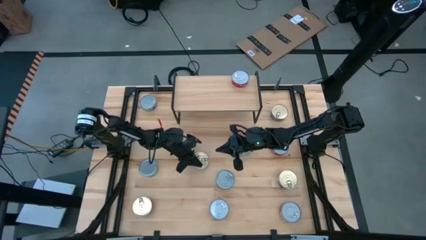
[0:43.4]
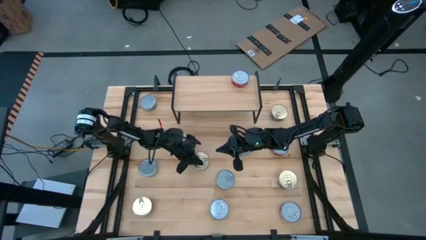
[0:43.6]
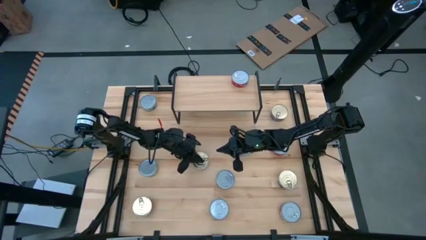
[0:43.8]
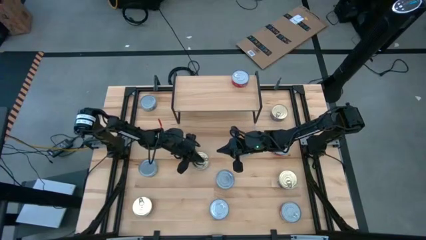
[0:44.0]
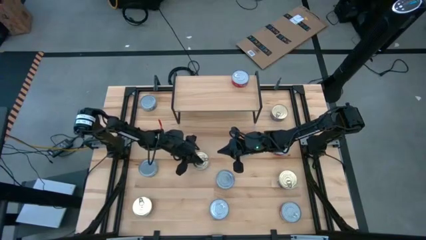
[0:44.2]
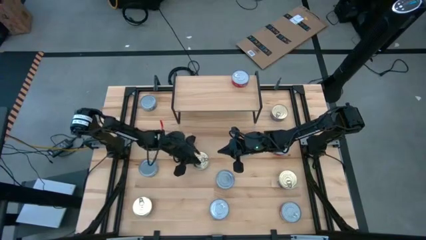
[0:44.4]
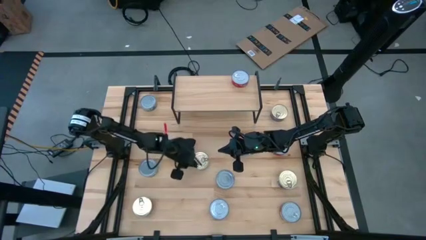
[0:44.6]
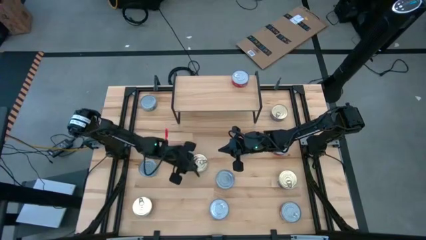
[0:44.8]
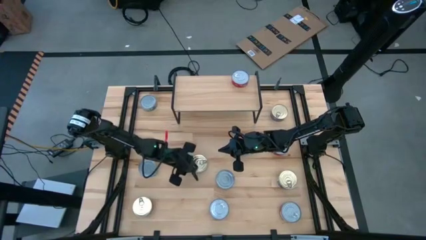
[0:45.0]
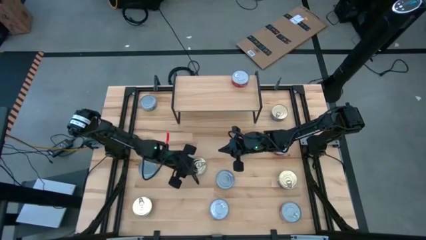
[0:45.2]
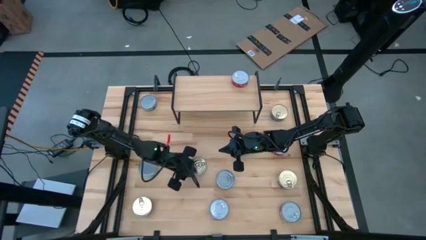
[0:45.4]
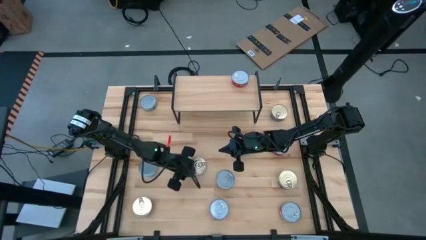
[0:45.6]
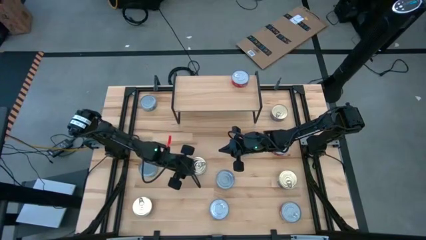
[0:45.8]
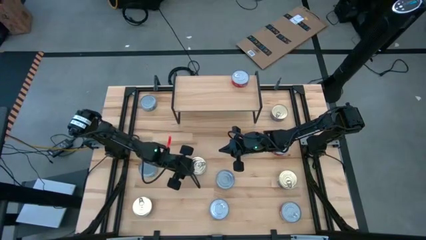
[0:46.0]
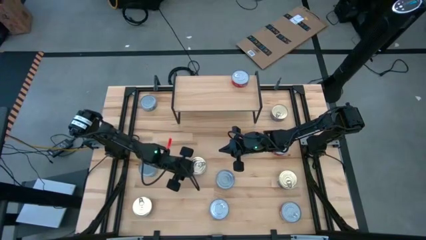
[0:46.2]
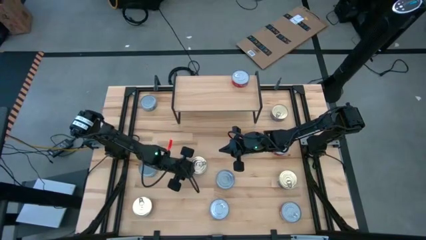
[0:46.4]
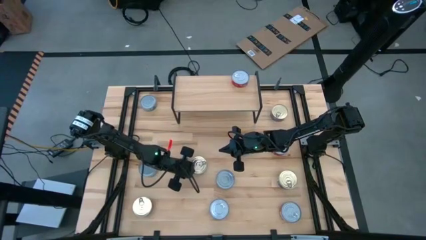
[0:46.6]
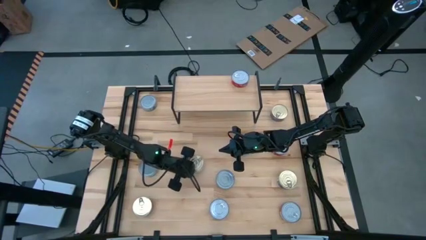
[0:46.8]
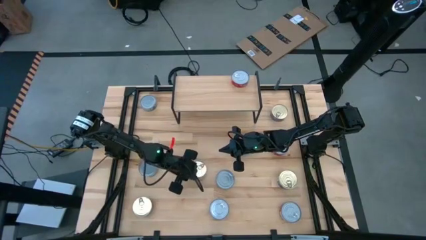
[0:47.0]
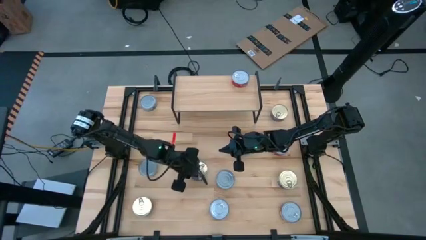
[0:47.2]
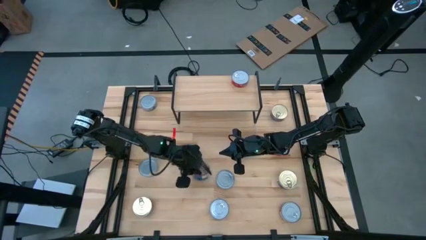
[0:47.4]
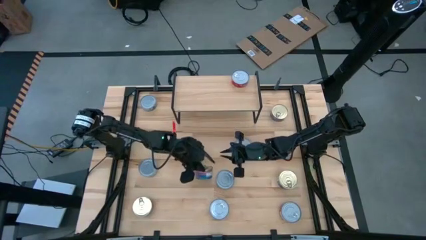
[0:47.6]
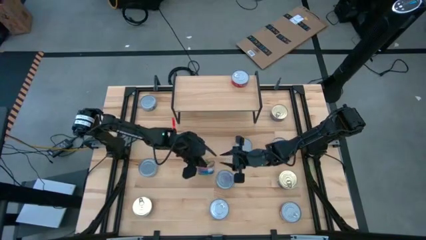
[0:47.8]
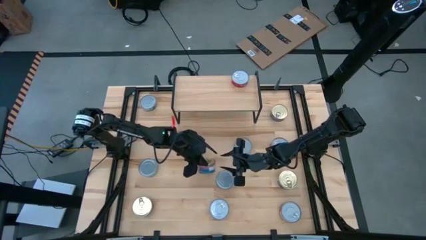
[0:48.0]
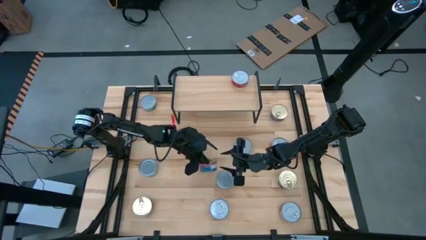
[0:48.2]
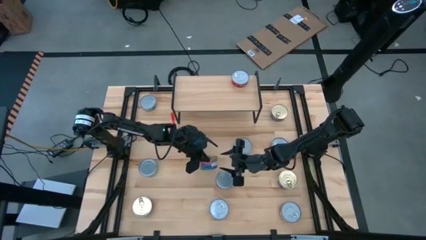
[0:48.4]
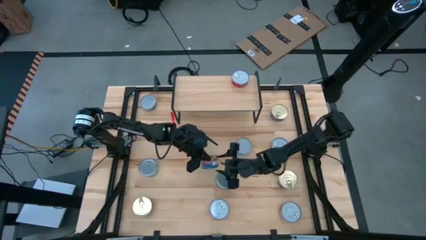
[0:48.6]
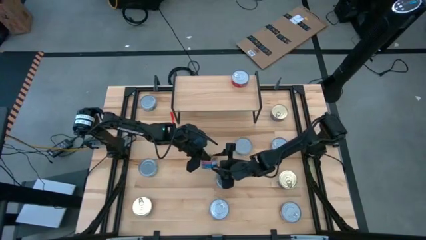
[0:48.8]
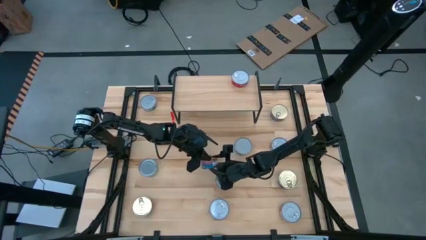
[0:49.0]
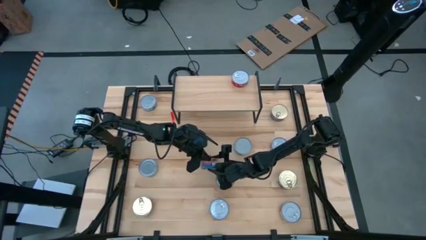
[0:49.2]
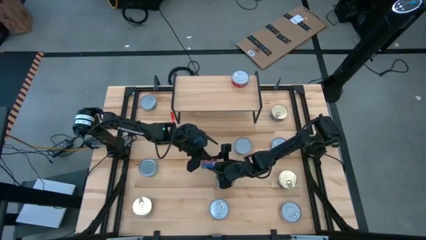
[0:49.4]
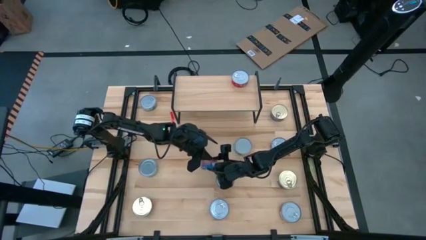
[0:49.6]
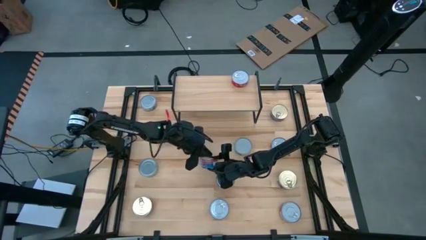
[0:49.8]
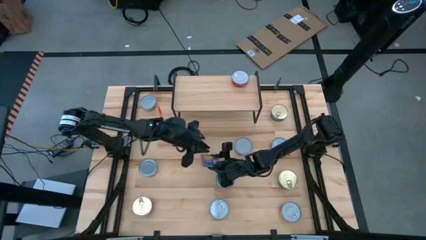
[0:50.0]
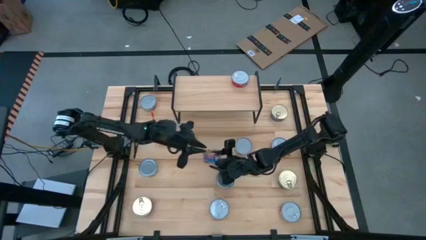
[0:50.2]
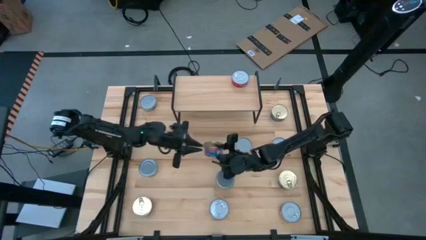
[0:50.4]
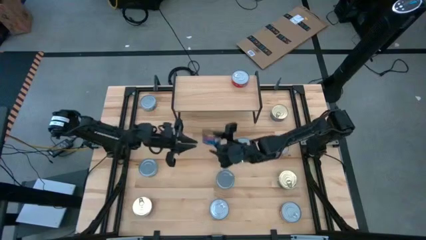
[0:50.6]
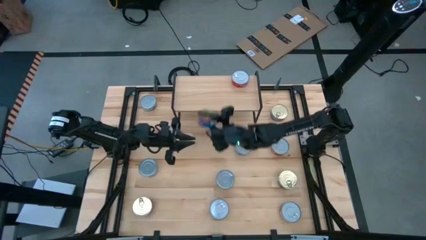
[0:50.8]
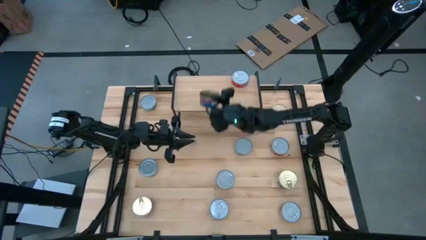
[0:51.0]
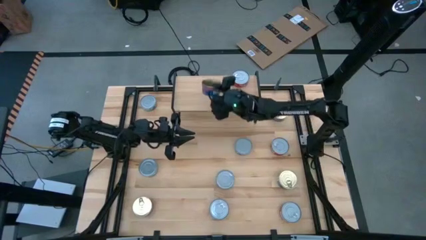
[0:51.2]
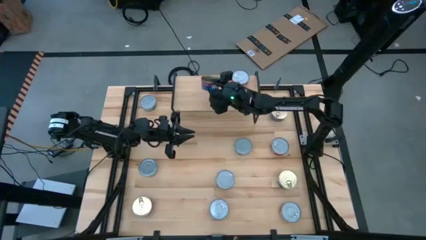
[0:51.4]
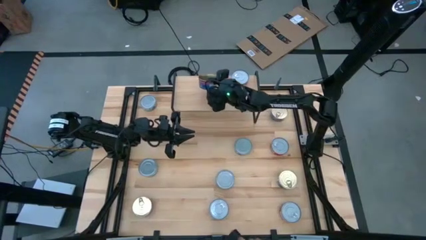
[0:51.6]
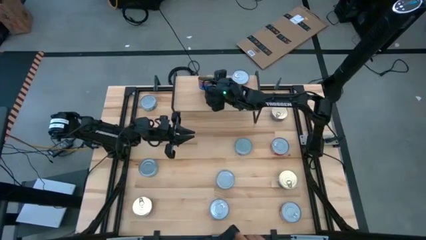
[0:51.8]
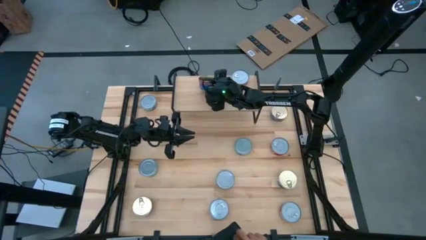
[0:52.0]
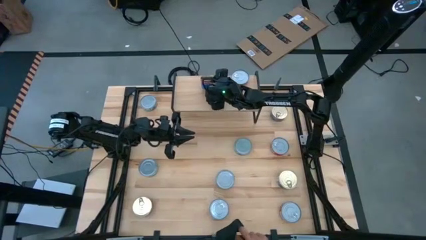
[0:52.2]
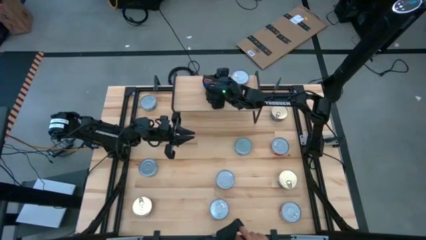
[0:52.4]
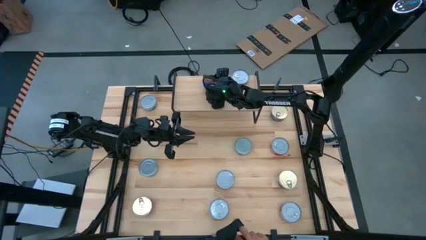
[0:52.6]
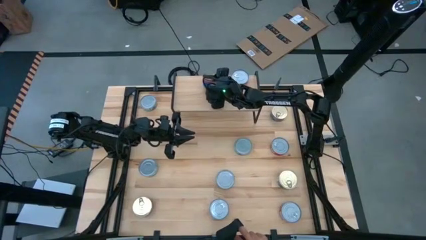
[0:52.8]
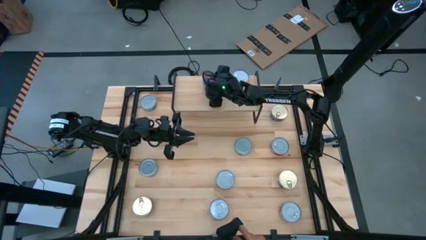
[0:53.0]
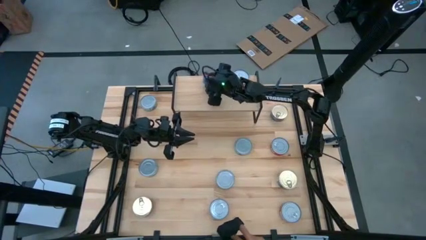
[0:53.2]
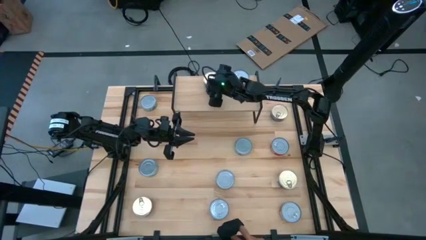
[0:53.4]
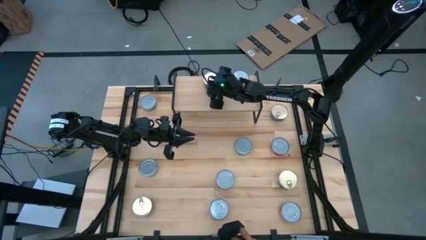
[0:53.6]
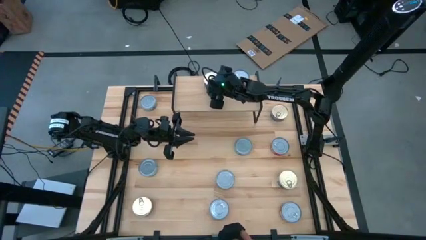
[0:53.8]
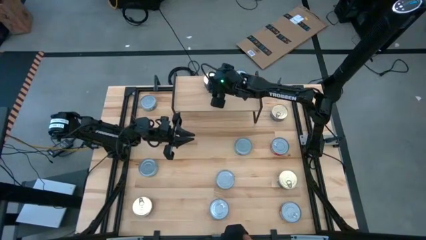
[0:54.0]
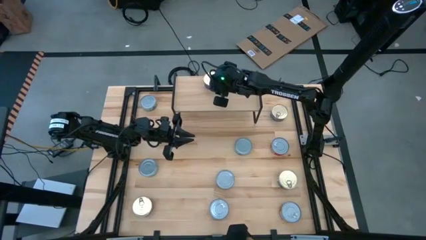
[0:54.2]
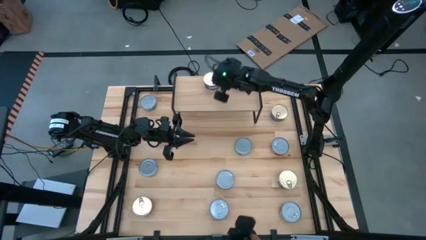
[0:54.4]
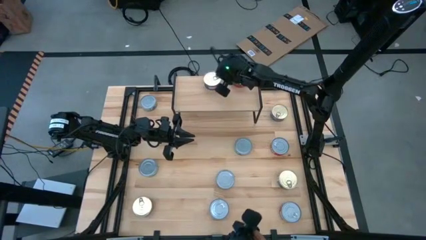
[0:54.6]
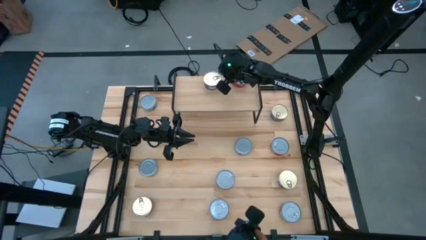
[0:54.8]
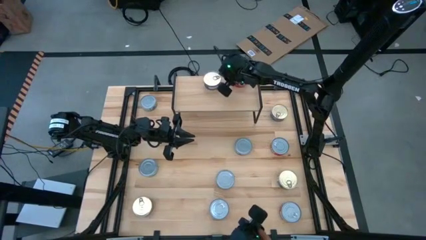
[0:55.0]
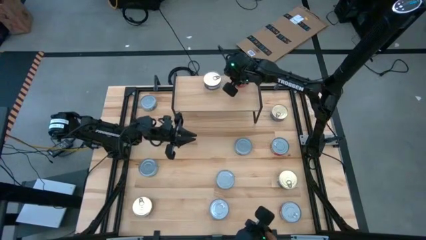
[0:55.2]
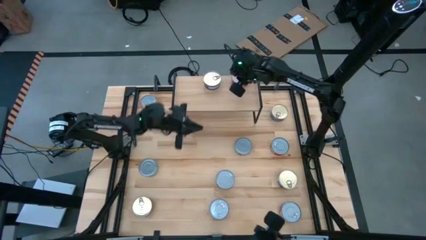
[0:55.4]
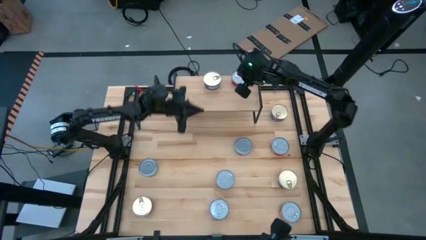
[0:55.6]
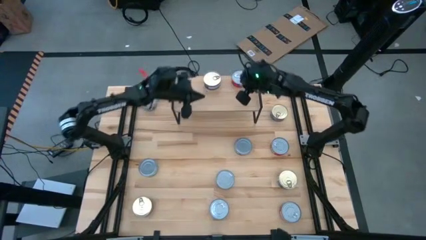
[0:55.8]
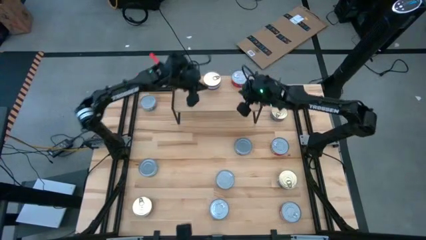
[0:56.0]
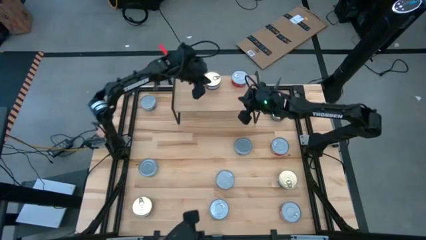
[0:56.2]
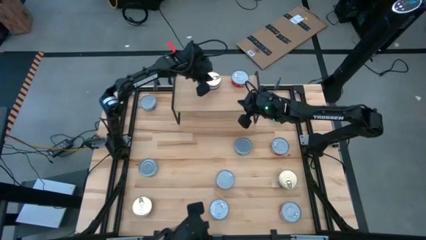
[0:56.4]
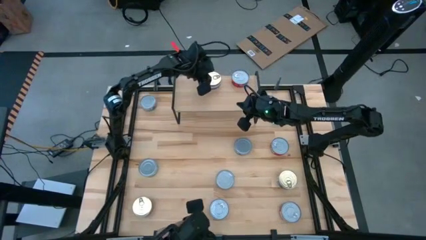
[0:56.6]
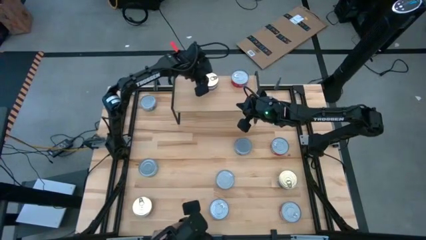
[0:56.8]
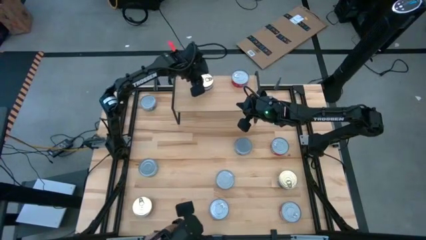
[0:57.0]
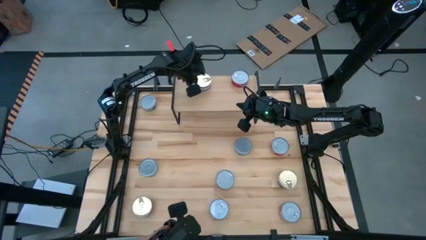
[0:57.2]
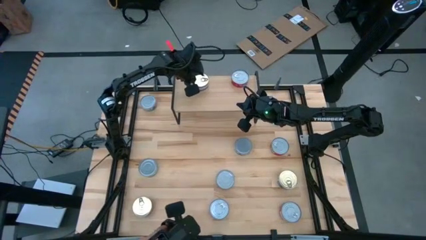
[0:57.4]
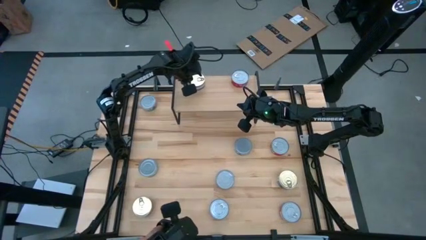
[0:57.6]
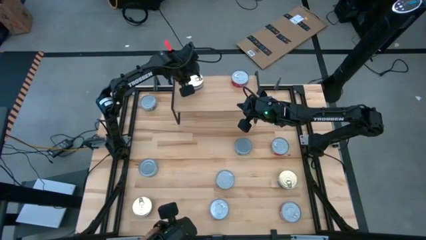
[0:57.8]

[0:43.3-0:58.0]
Task: Stack canned seafood by type on shelf
Put the blue pink tuna can on the shelf

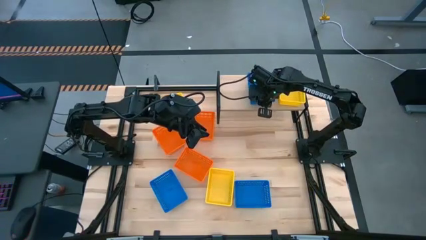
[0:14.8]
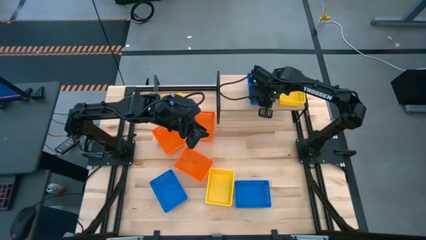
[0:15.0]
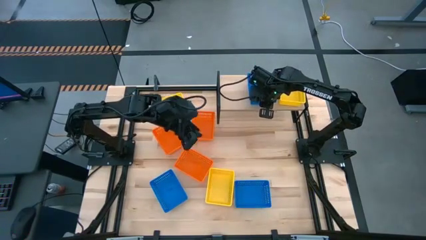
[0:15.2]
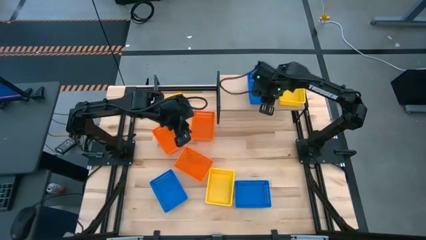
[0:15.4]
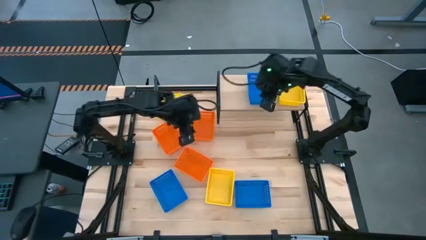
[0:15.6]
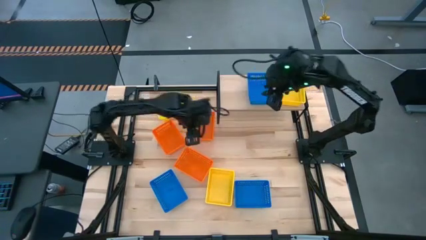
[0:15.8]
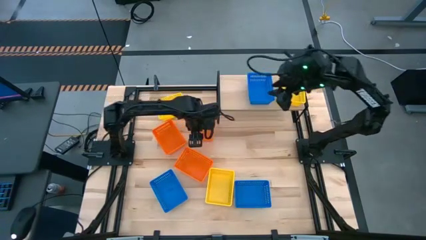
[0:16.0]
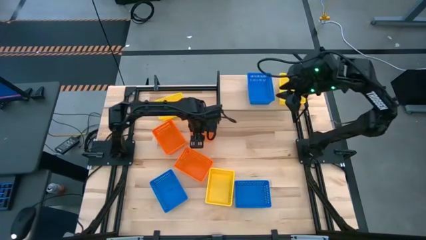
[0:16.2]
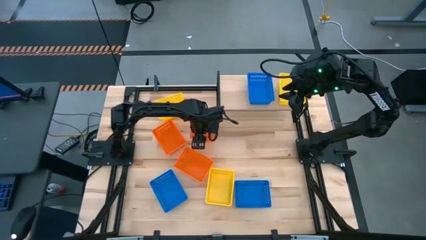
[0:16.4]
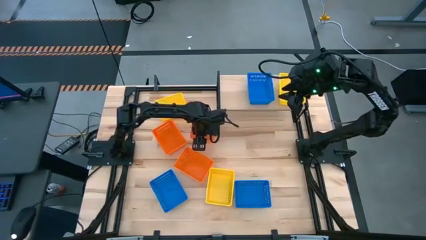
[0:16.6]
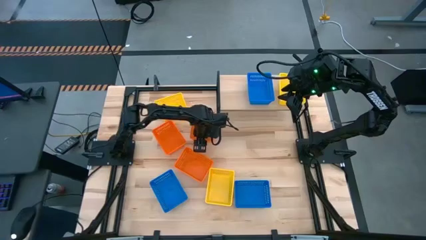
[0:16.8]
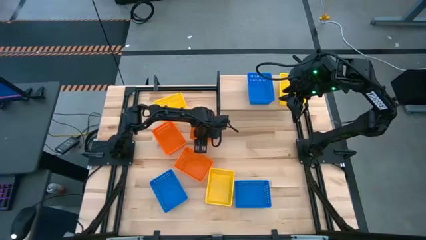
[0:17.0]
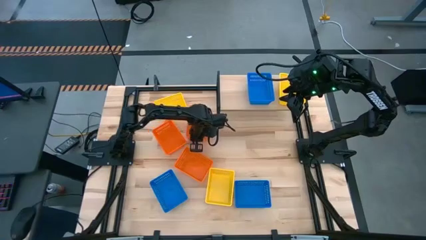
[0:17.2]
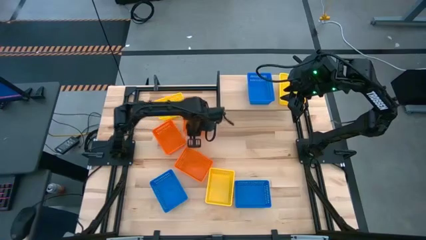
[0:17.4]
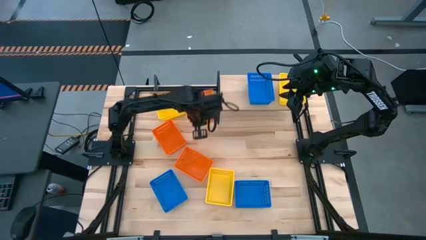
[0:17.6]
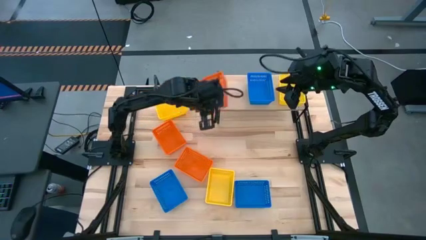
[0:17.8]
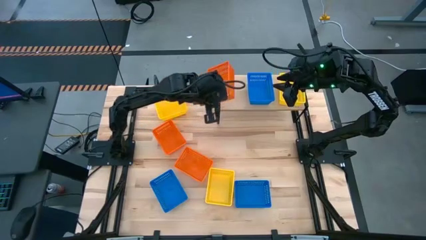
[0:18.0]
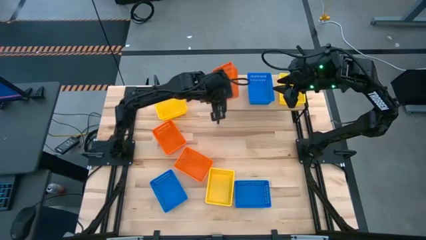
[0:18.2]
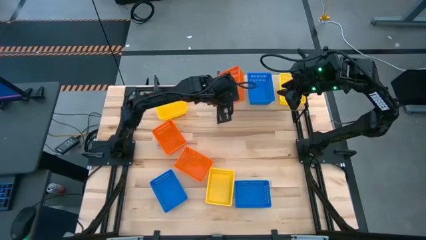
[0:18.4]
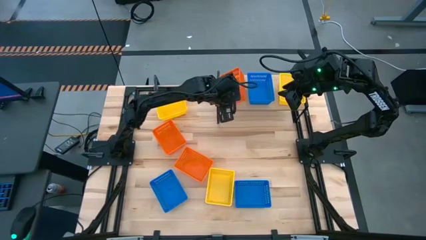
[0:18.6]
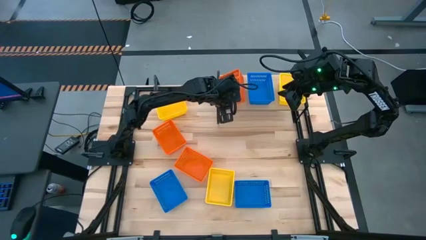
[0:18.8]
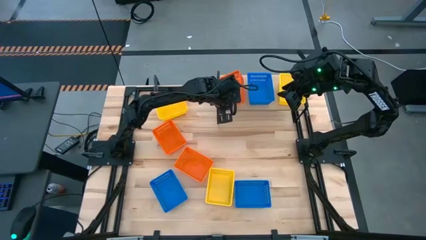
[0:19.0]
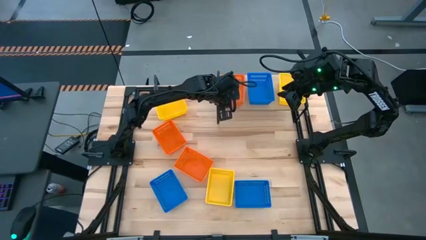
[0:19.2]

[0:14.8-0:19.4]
Task: Stack baskets on shelf by color
Put the top right orange basket on the shelf
